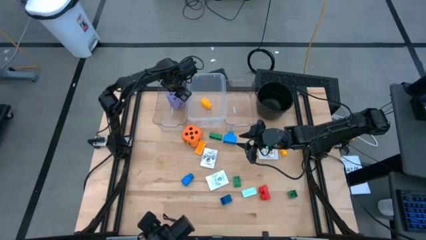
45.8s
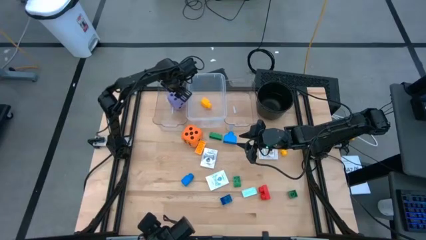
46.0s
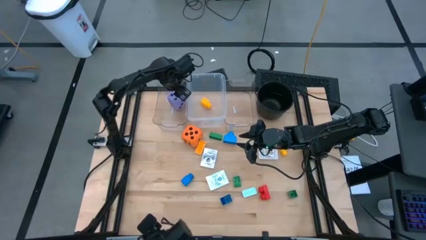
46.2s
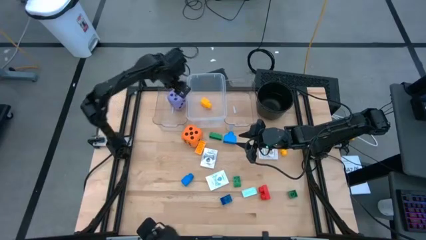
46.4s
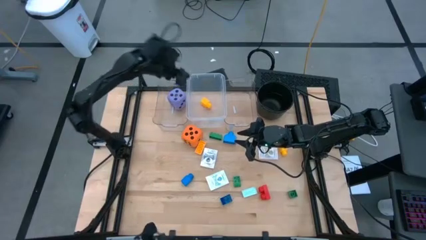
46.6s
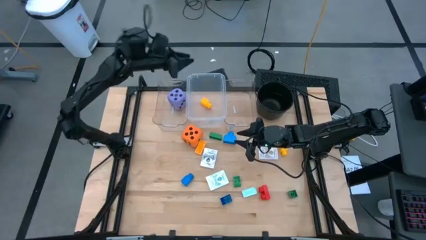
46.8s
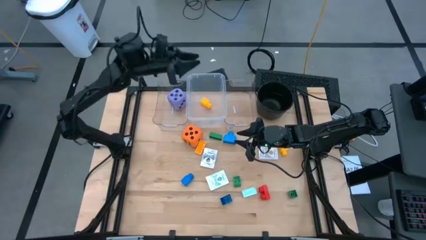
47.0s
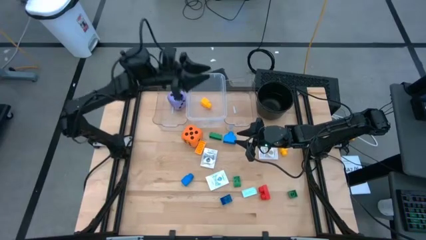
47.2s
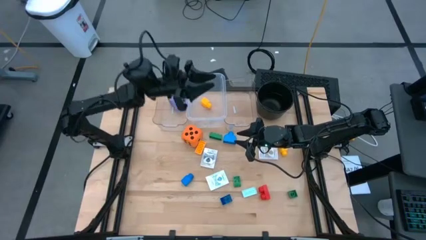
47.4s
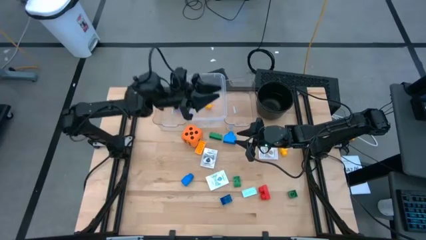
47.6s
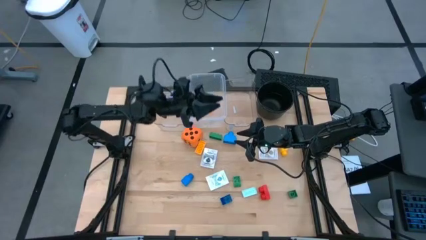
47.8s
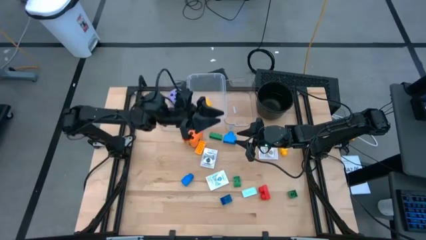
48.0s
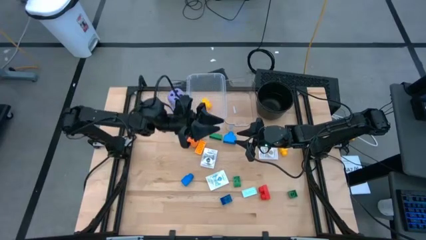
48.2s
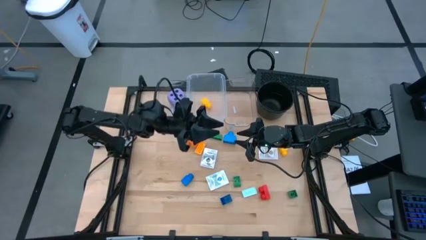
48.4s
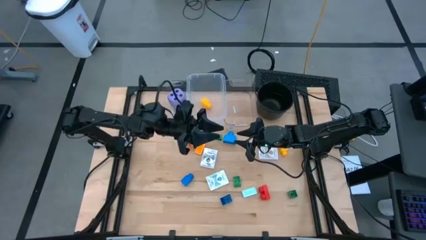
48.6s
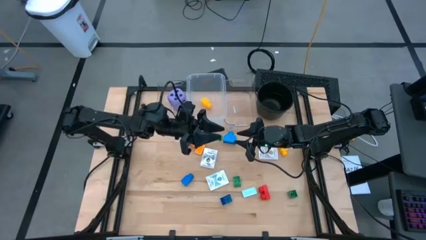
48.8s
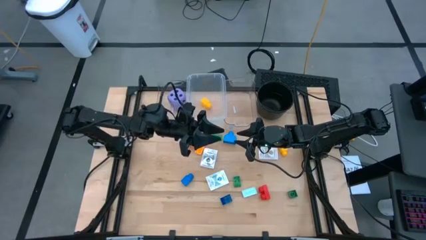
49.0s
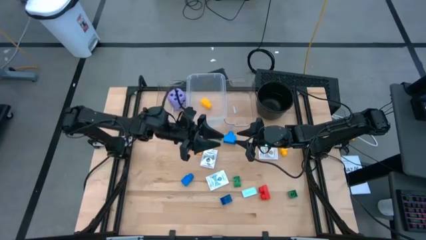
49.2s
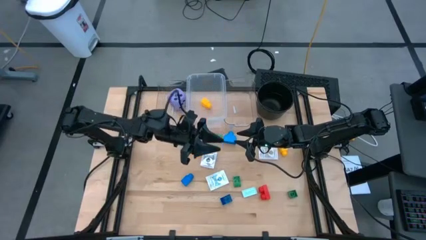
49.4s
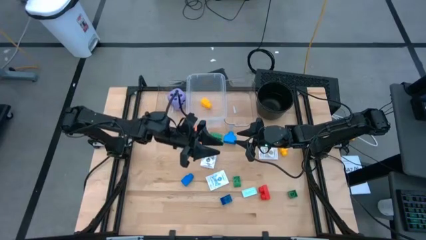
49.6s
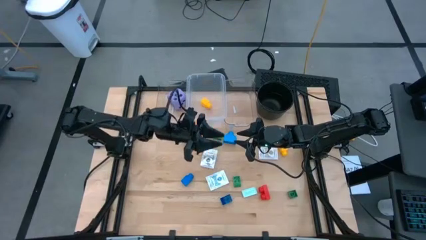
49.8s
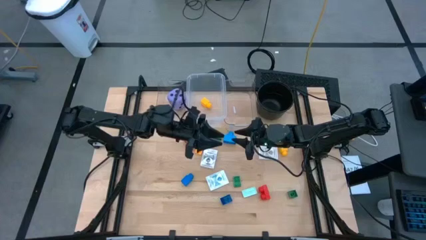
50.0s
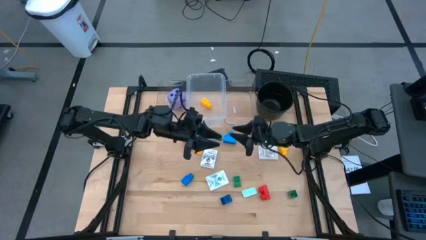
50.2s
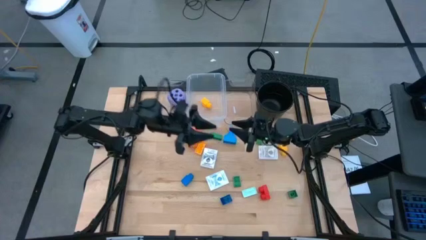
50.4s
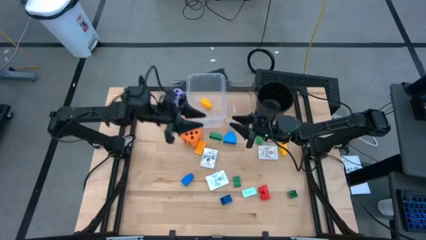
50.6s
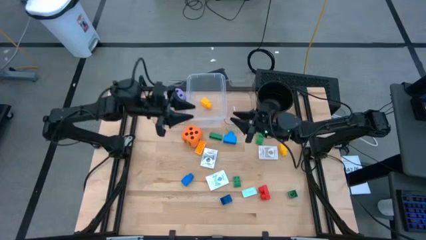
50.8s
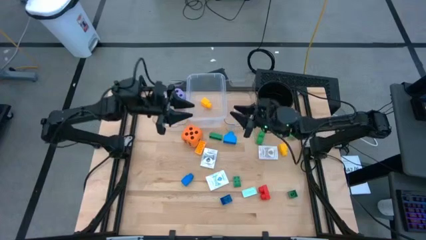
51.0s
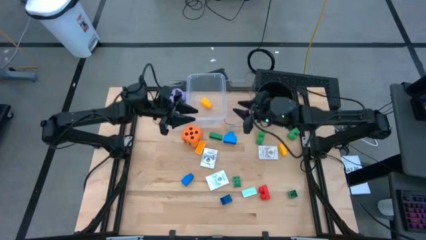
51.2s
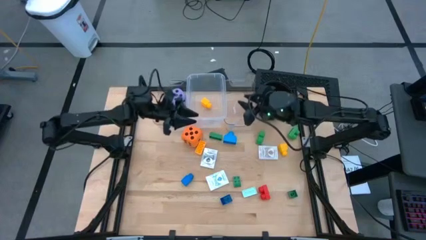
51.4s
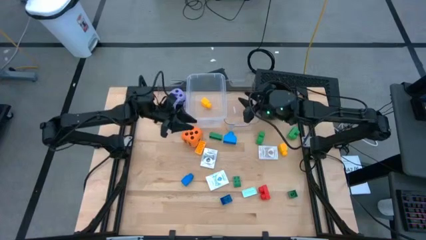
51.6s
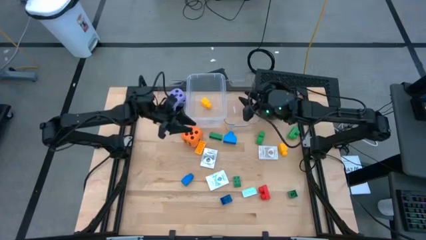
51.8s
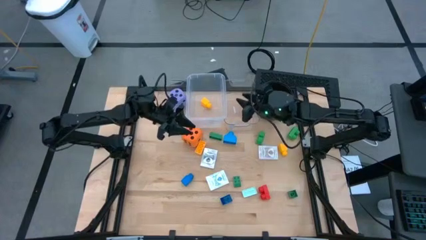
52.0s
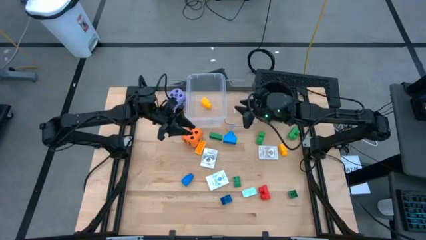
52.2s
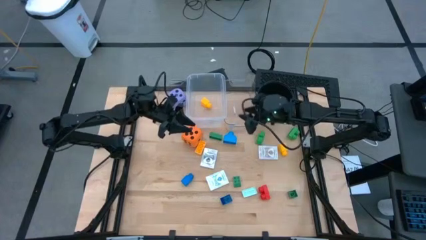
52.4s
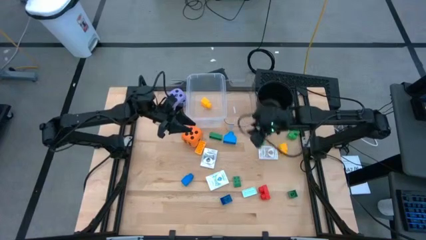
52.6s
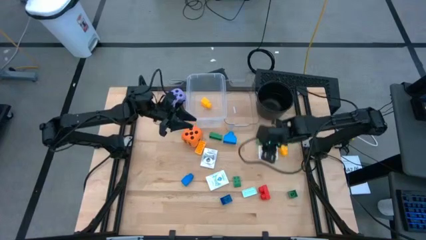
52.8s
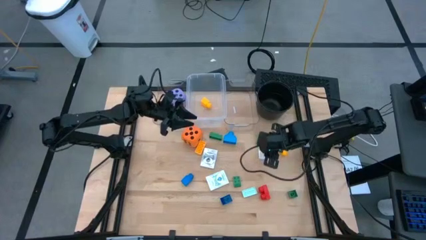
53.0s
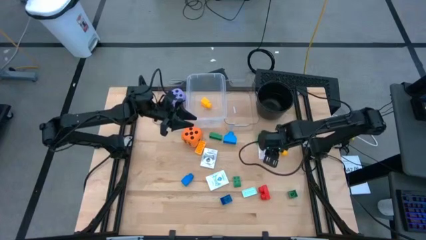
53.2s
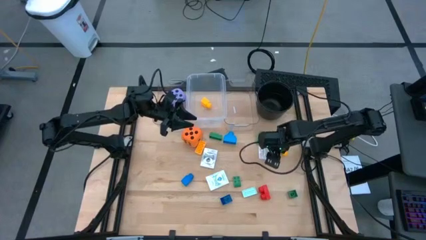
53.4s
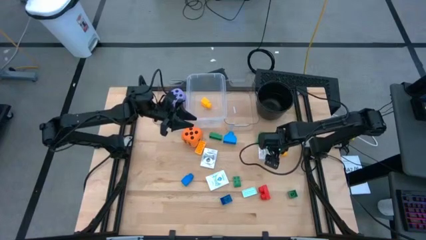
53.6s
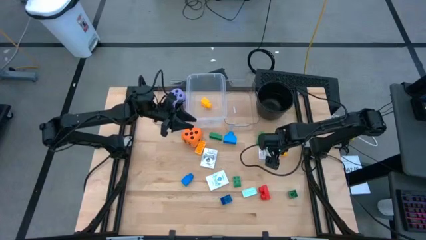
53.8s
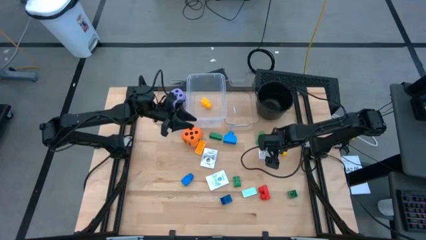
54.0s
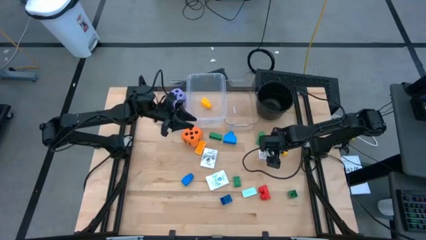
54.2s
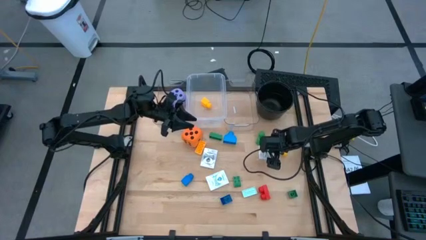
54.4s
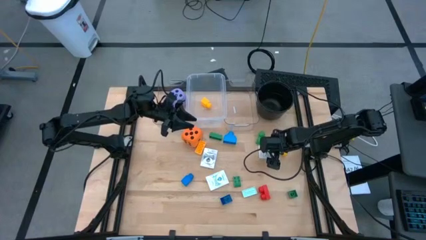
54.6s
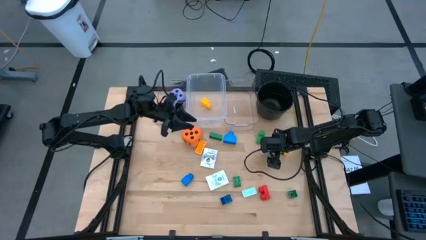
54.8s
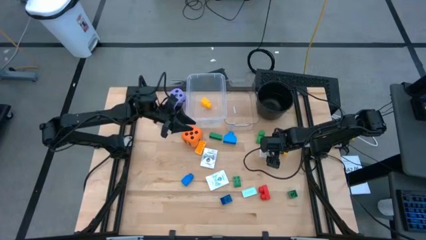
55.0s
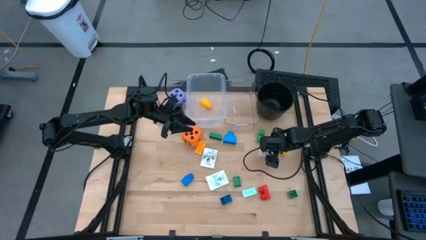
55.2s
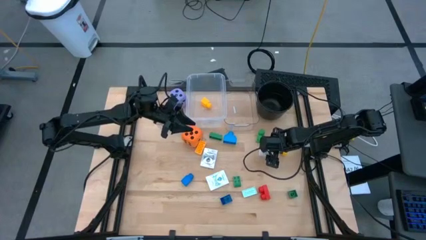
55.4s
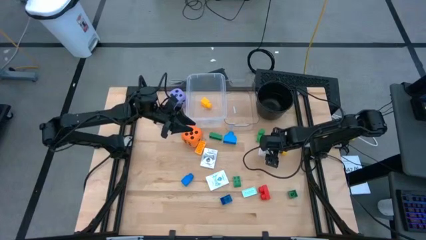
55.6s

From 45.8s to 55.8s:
Task: Pick & Place Toys
Put the brown playing card box into the right transparent bin

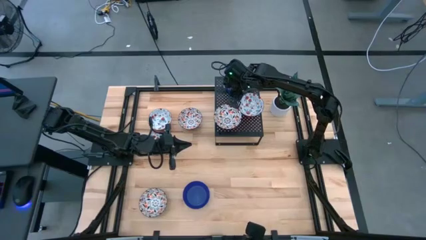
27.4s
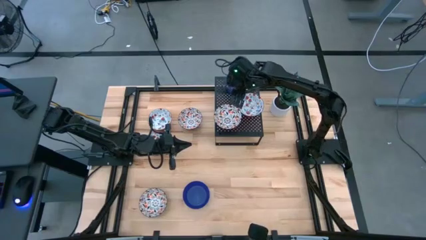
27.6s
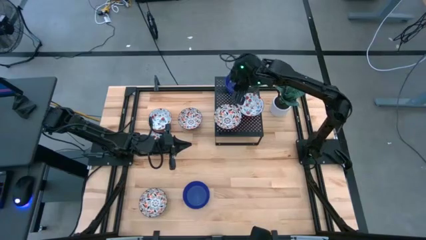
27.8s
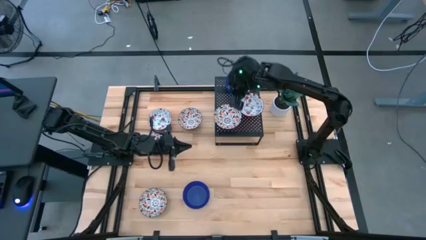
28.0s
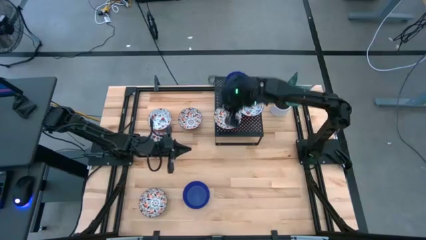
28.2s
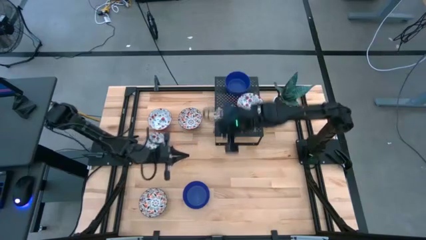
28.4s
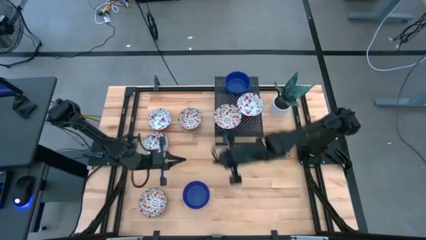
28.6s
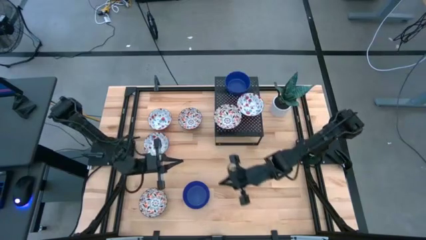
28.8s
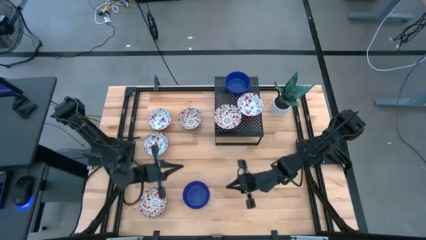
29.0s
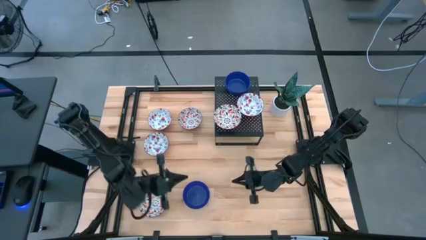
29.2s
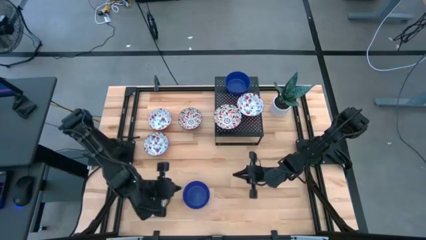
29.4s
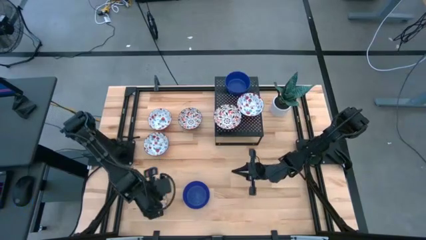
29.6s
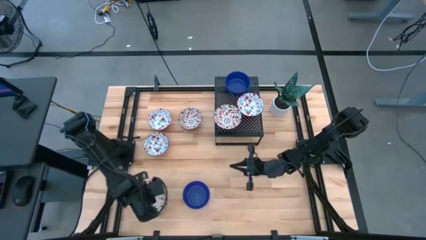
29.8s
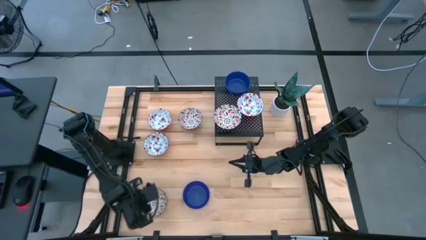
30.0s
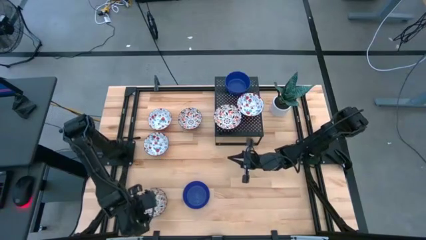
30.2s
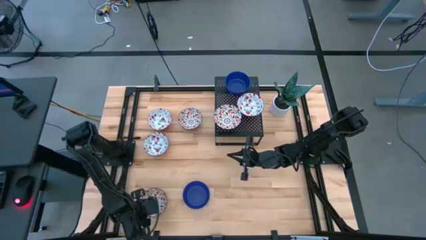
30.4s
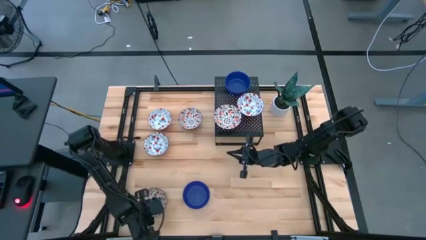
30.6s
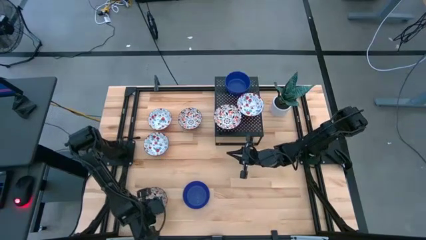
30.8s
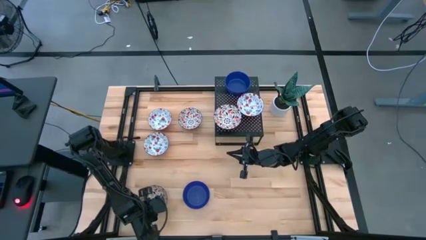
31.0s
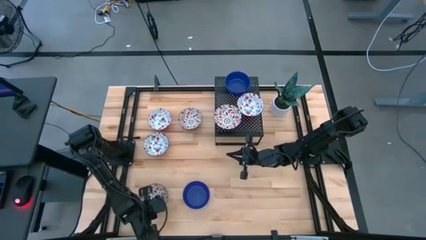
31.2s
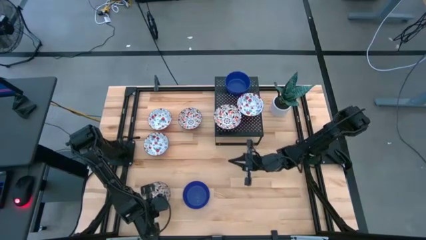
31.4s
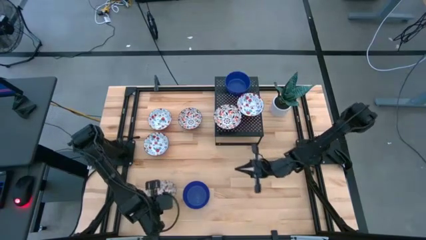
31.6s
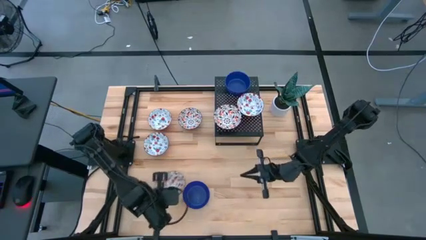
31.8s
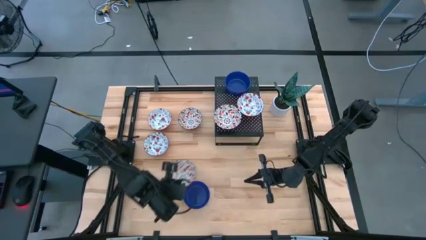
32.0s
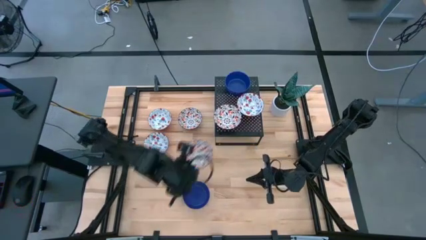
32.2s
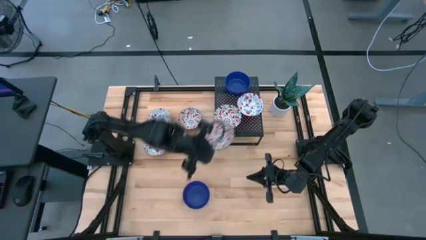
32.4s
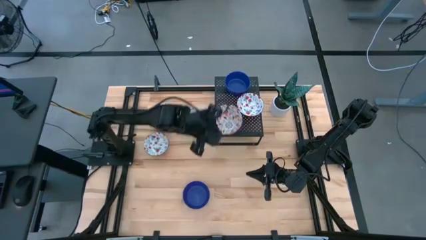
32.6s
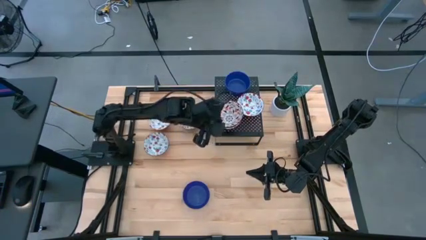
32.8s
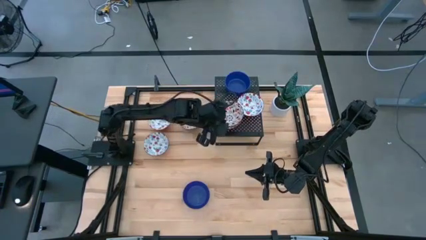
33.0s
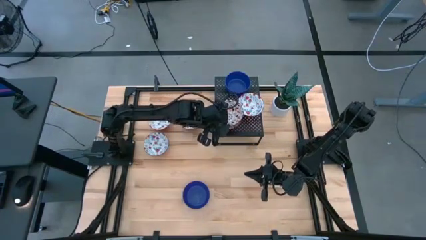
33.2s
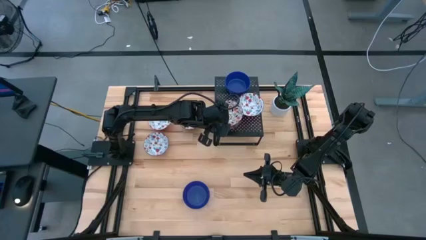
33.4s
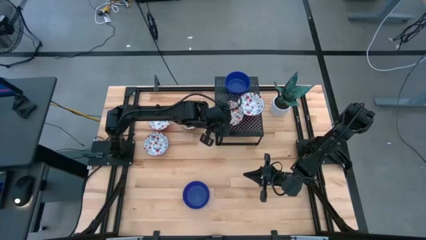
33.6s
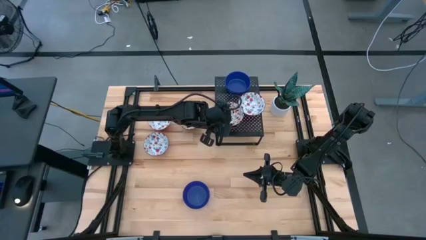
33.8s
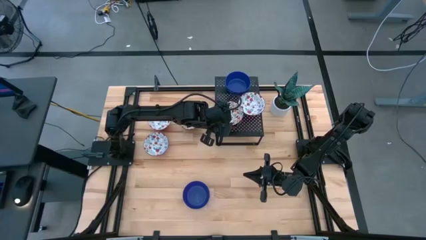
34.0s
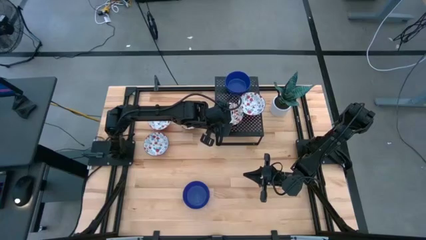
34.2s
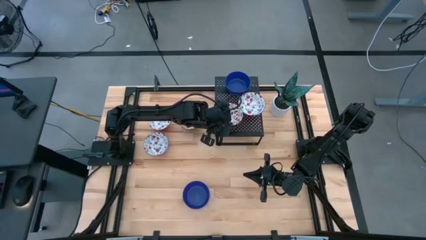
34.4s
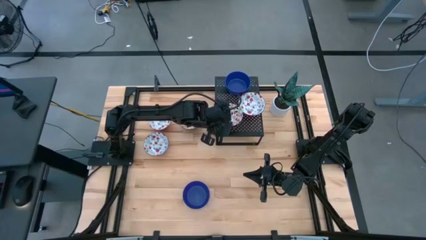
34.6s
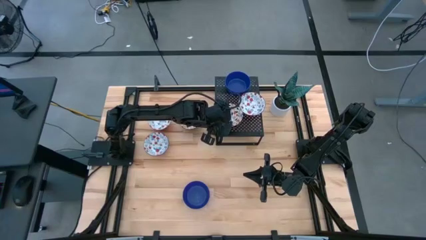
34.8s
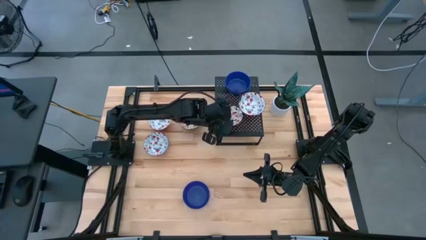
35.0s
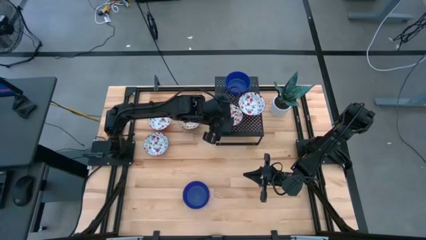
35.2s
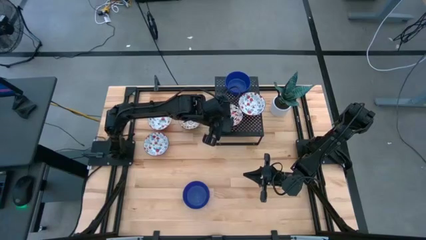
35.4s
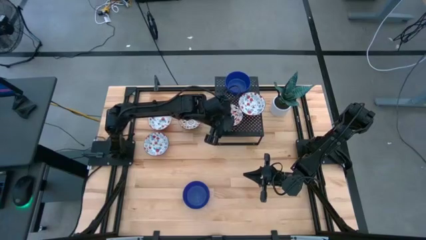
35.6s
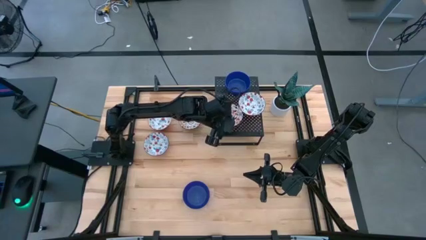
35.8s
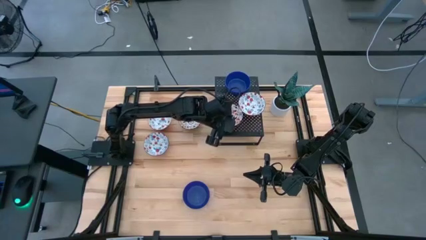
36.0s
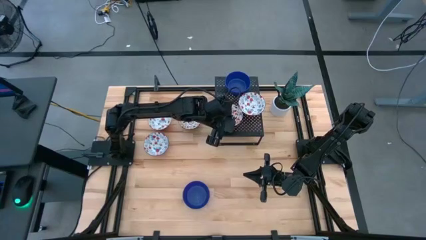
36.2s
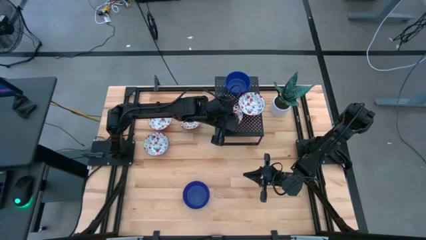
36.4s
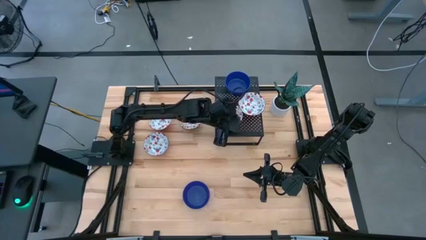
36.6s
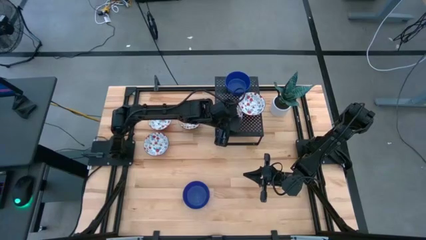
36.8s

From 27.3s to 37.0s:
Task: Pick & Place Mini bowls
Stack the bottom black and white bowl on top of the black and white bowl on the shelf
